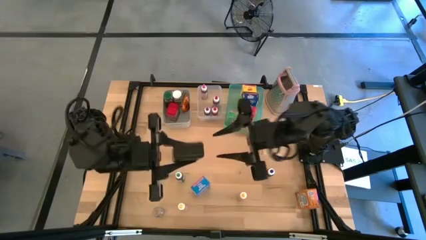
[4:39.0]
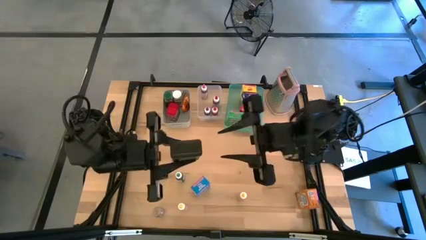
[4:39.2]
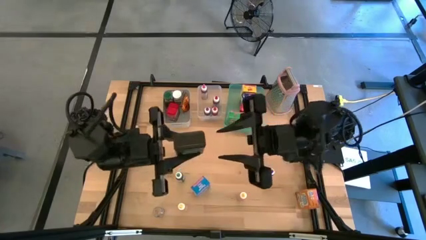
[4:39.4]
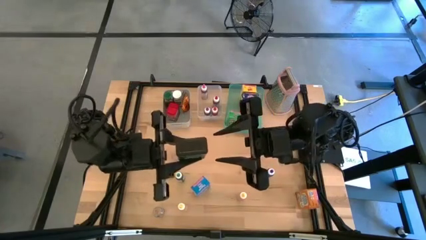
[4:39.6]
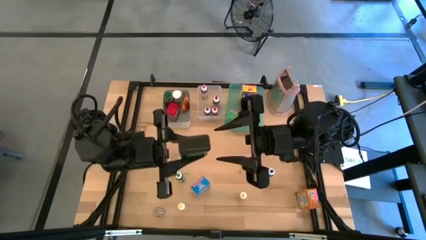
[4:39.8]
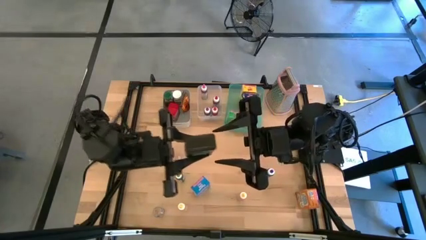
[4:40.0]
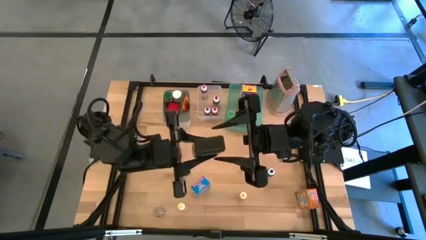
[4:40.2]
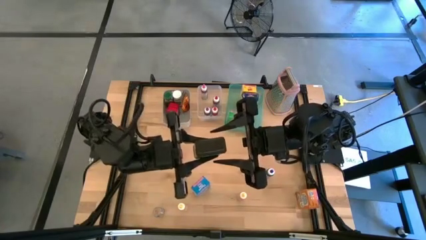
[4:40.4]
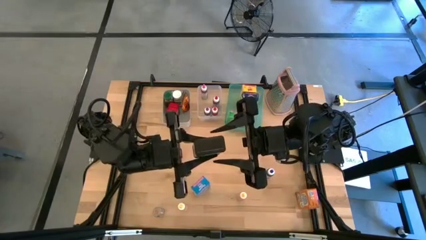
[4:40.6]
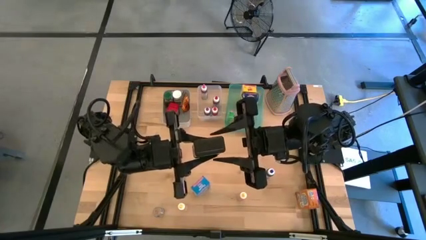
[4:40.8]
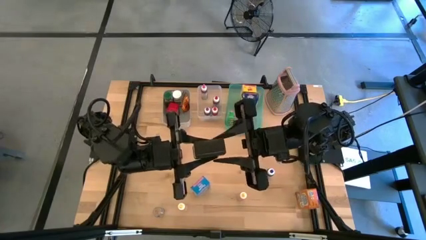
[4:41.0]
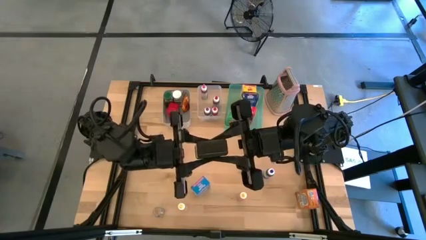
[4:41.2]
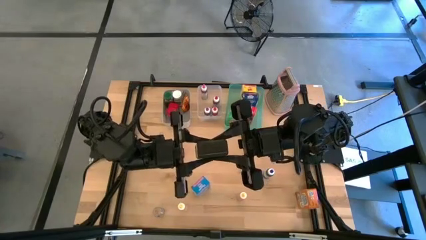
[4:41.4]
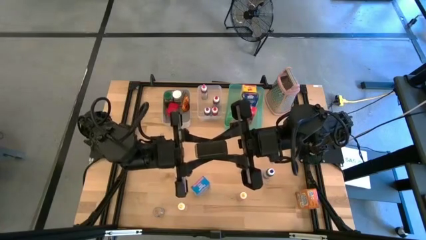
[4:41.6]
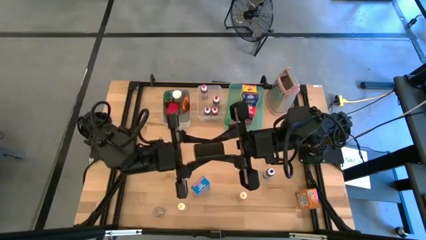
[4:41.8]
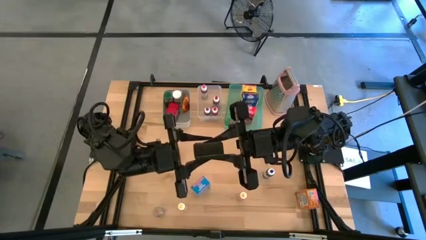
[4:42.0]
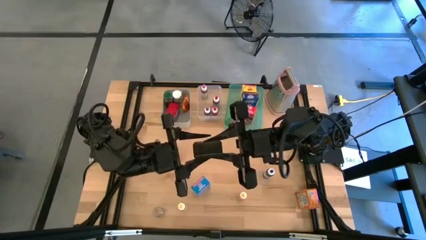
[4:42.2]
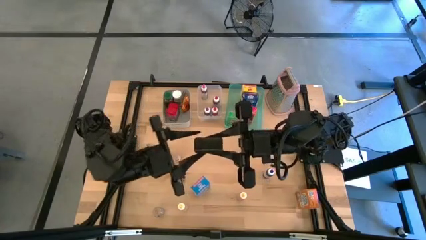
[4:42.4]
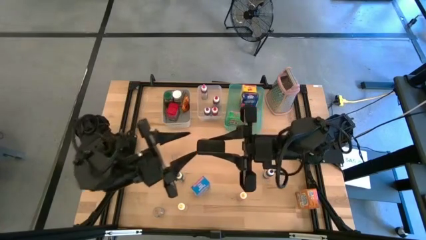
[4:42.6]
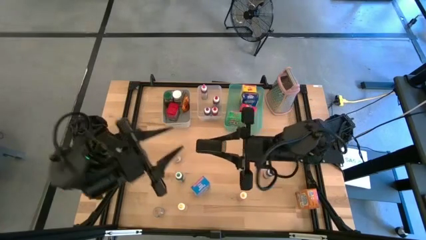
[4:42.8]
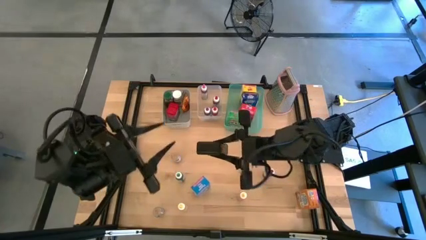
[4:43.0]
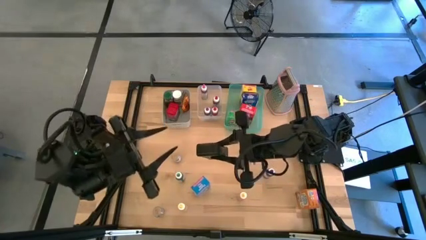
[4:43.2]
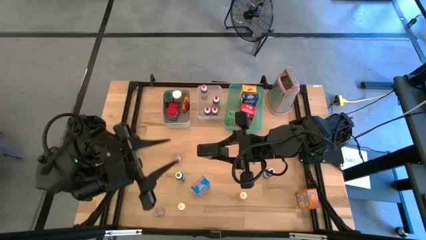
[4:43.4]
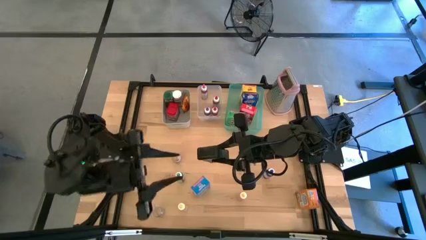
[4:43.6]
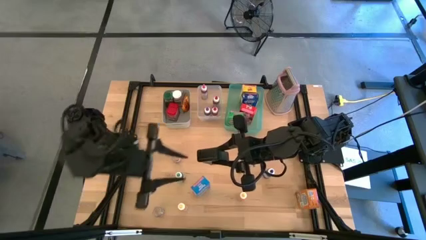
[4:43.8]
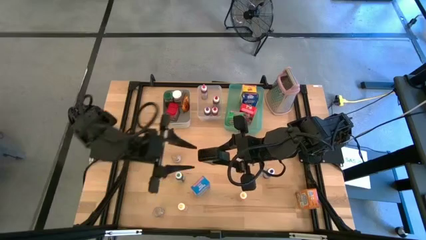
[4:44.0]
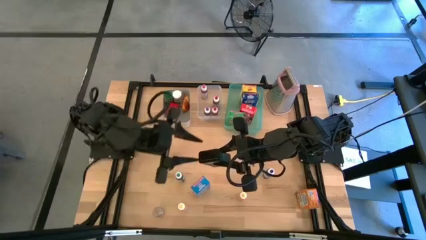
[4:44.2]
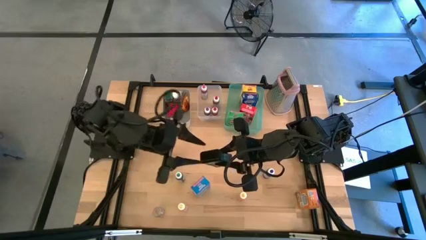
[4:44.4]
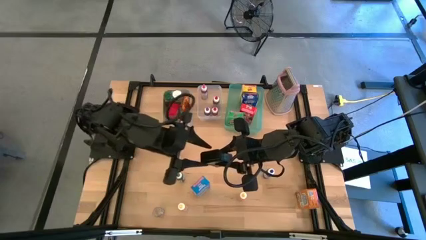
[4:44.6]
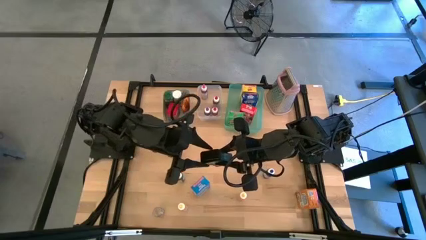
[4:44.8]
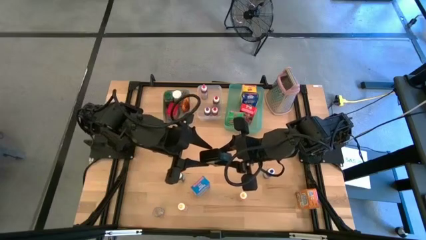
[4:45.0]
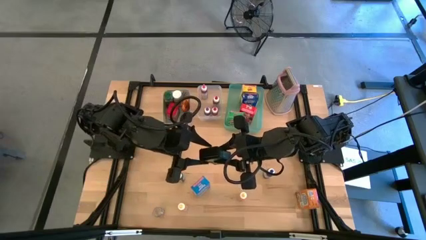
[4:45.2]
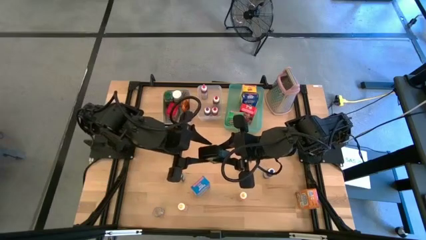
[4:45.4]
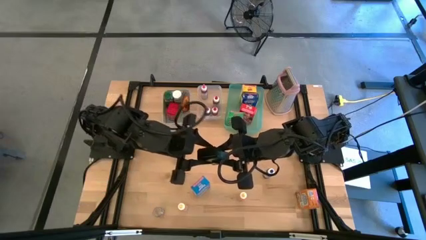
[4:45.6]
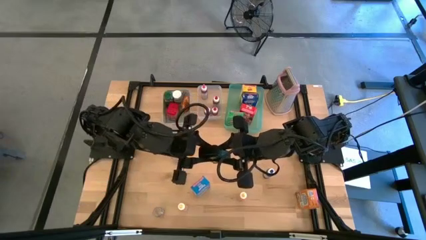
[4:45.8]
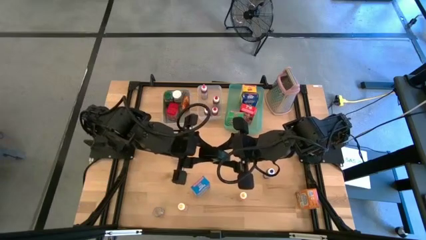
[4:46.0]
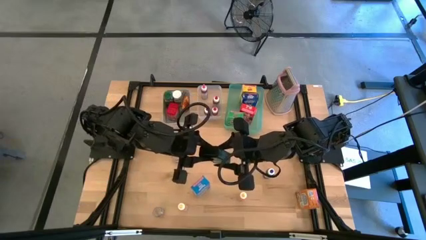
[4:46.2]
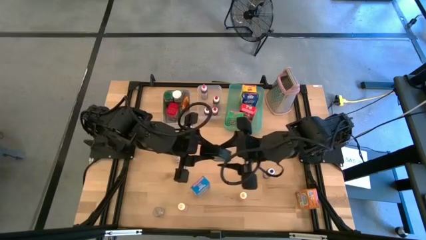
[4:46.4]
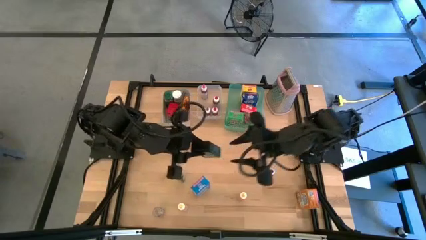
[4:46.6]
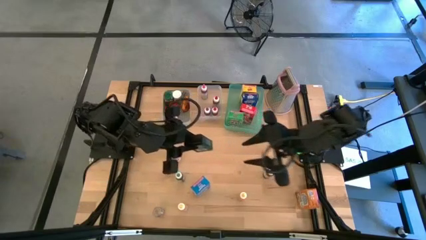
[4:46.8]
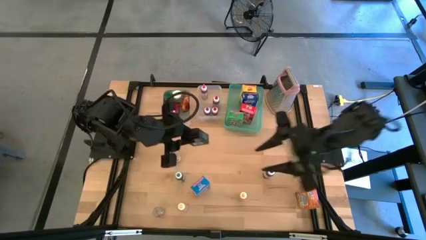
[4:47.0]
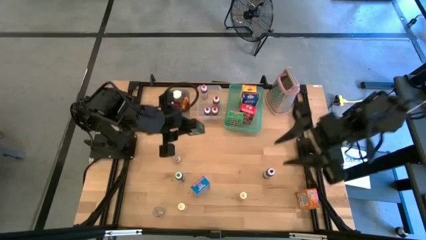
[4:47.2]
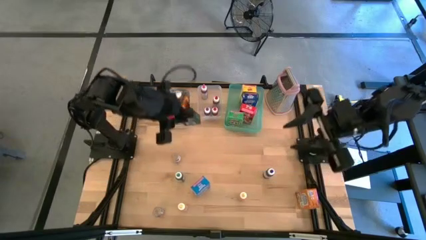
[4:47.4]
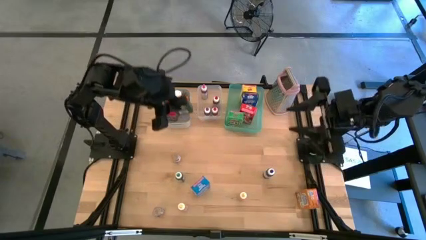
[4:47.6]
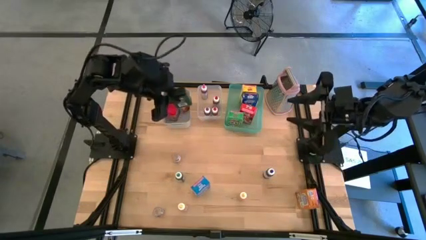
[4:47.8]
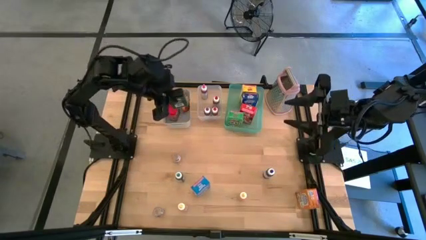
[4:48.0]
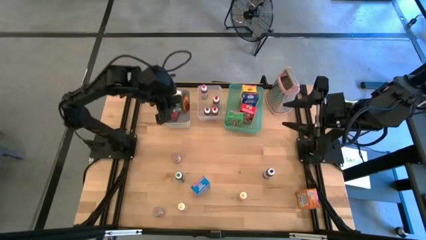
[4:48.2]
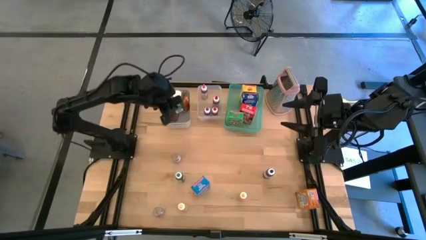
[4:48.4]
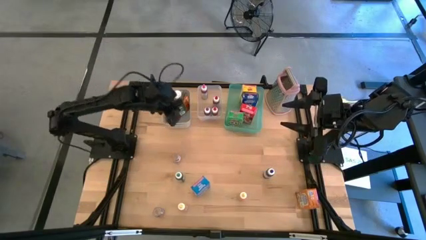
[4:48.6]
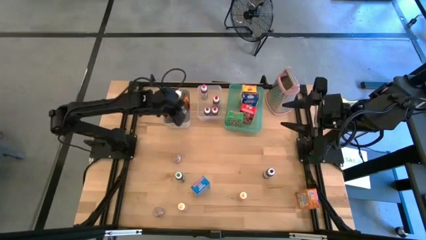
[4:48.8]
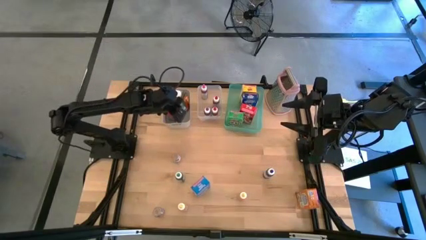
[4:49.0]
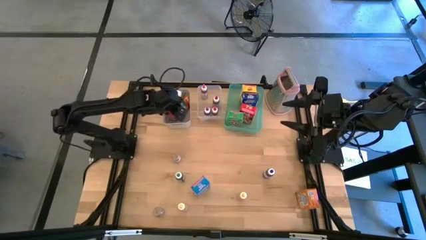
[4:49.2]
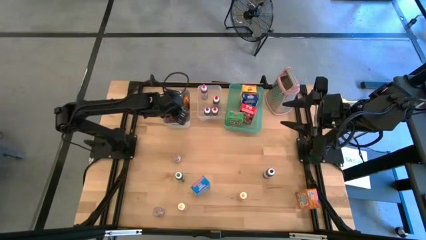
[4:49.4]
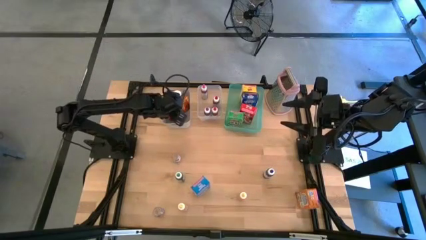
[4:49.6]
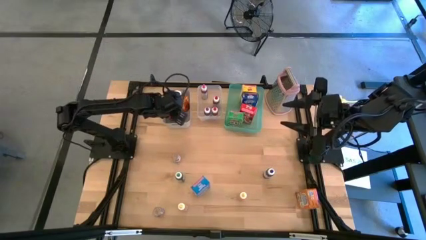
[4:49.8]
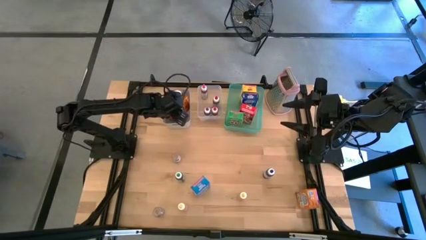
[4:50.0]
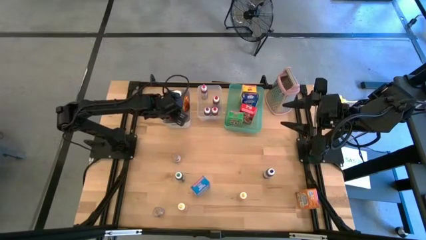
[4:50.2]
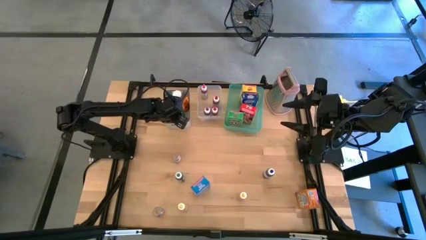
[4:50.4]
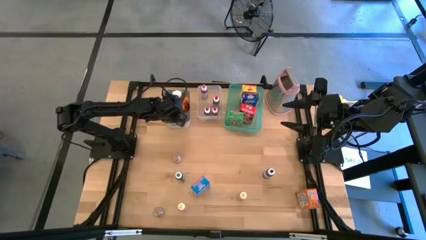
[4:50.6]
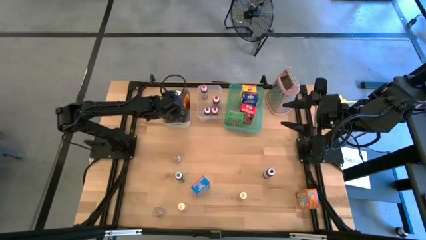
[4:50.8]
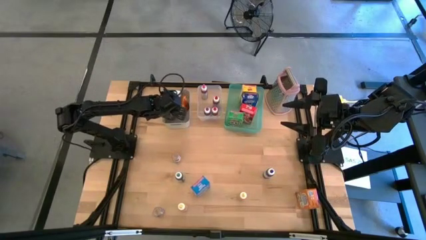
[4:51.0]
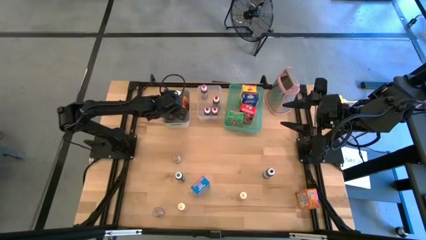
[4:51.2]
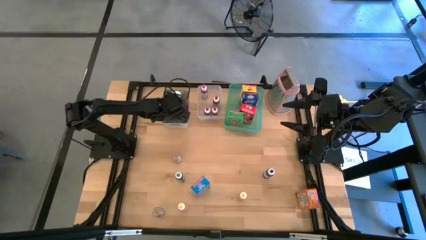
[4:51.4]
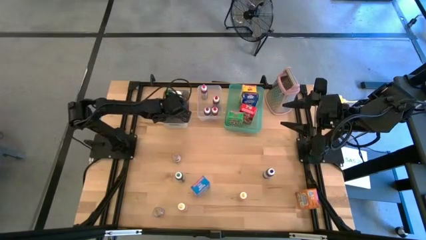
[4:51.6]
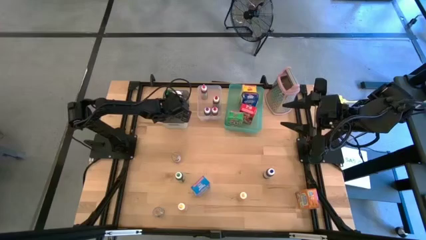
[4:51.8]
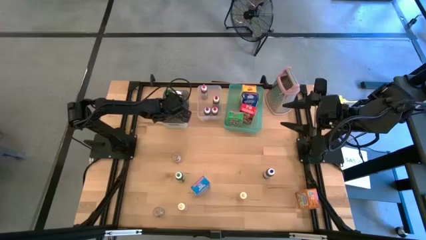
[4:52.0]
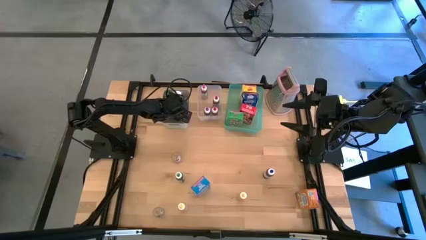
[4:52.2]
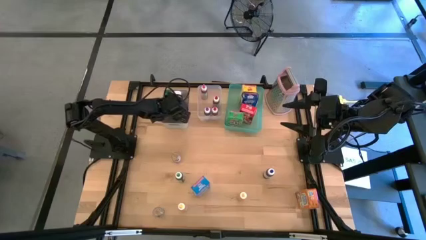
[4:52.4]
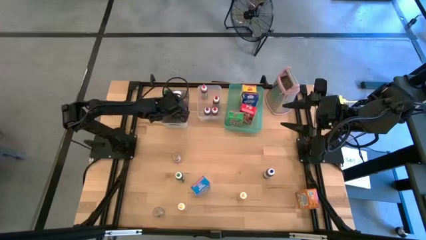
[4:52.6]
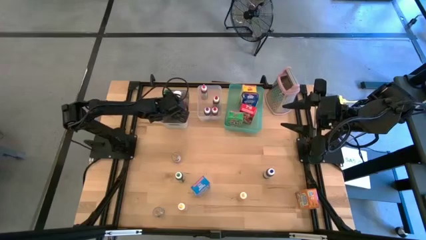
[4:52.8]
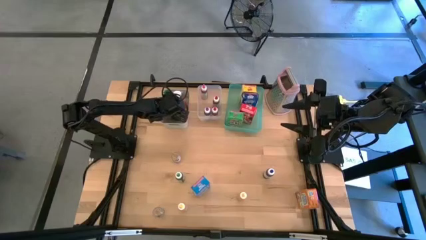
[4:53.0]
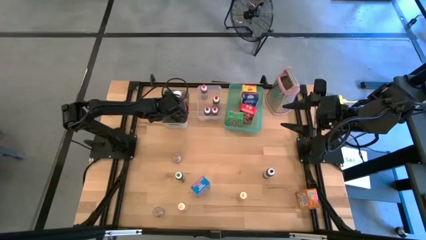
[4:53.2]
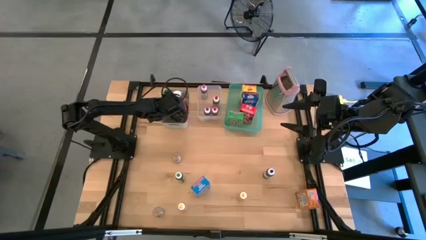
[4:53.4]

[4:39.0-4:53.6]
Task: Pick & Place Kitchen Items
Put the black seasoning can into the gray bin
